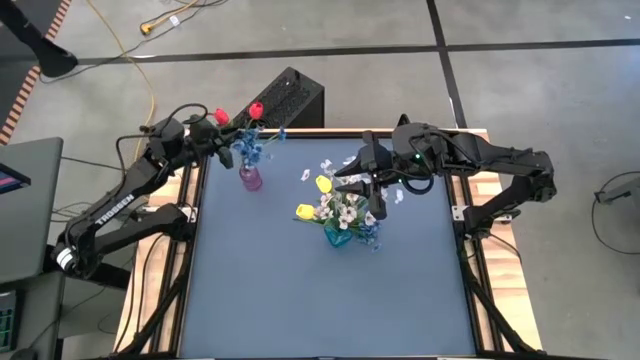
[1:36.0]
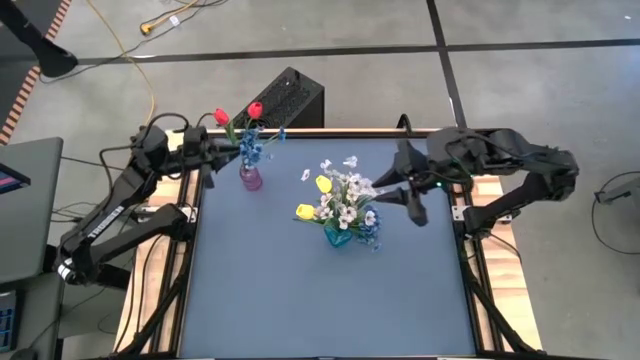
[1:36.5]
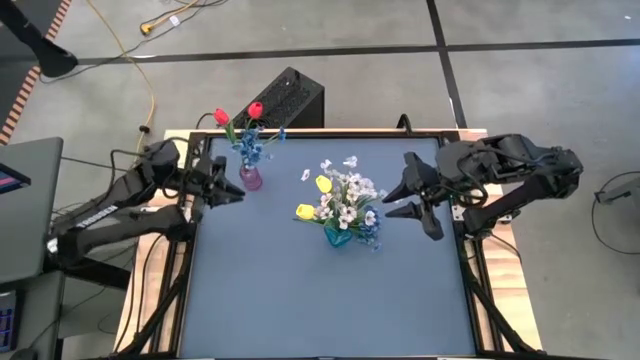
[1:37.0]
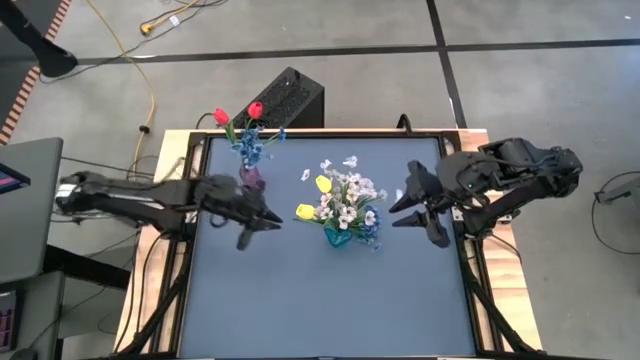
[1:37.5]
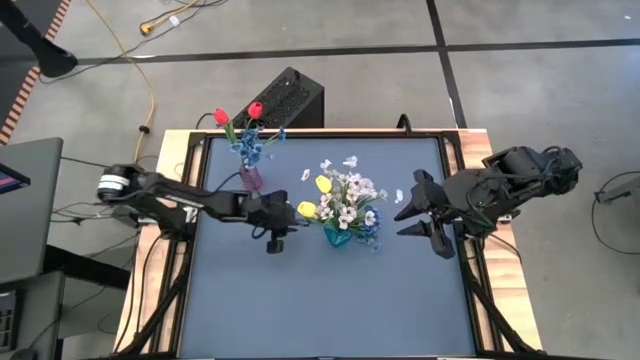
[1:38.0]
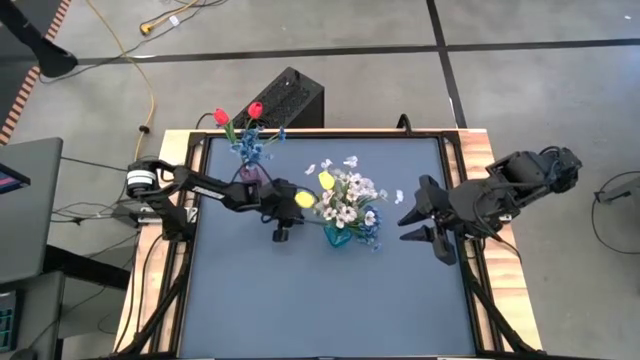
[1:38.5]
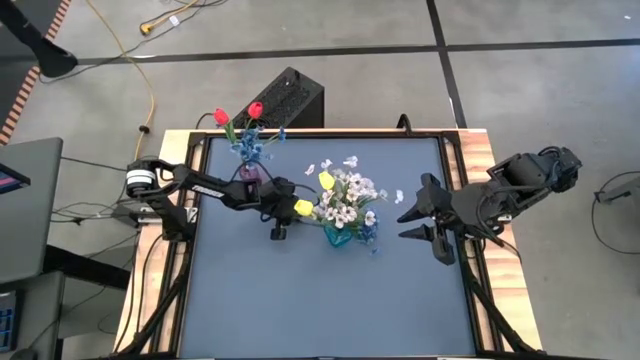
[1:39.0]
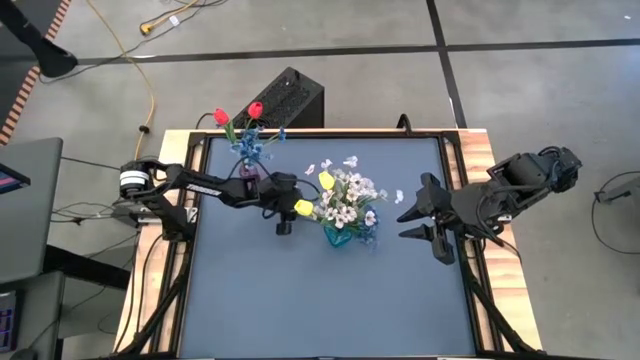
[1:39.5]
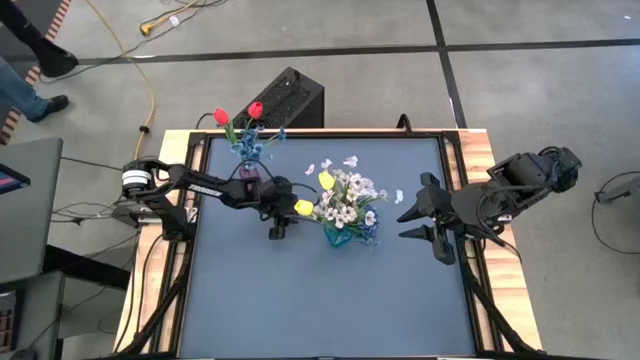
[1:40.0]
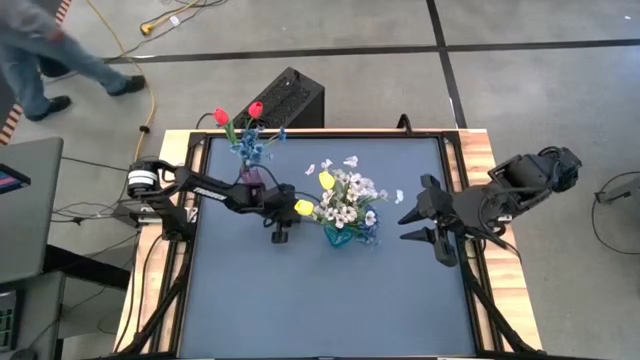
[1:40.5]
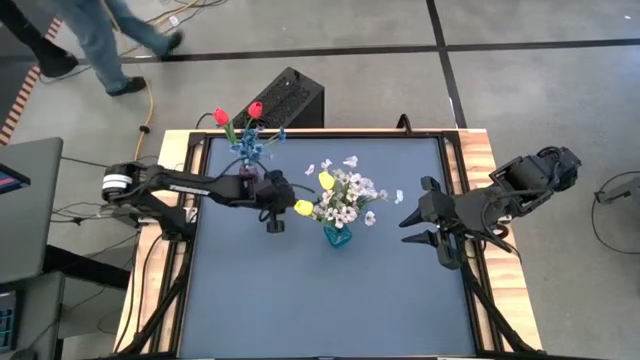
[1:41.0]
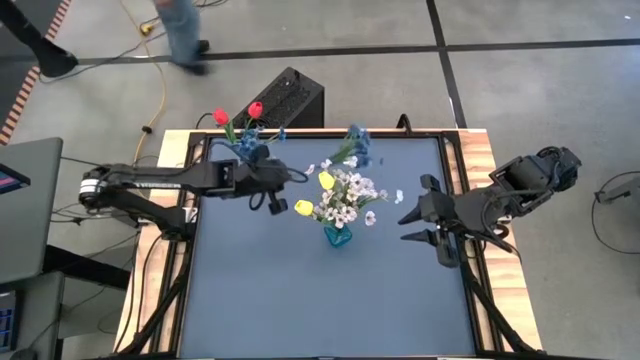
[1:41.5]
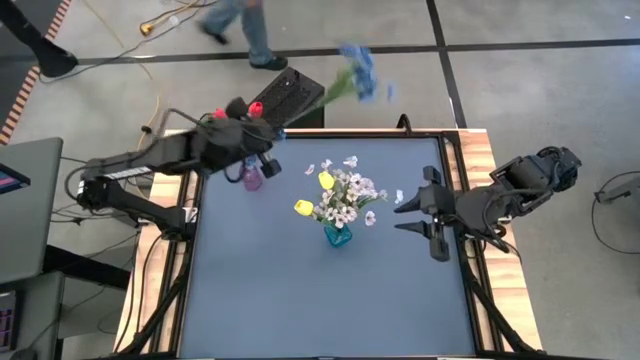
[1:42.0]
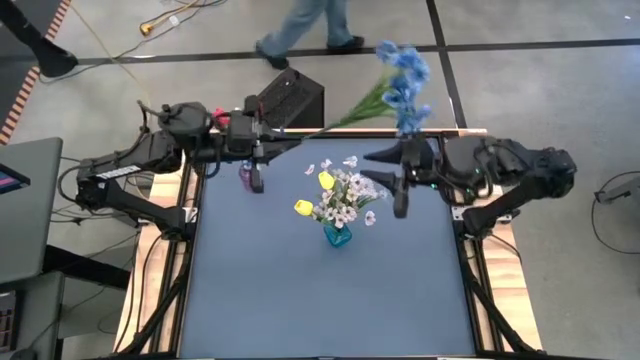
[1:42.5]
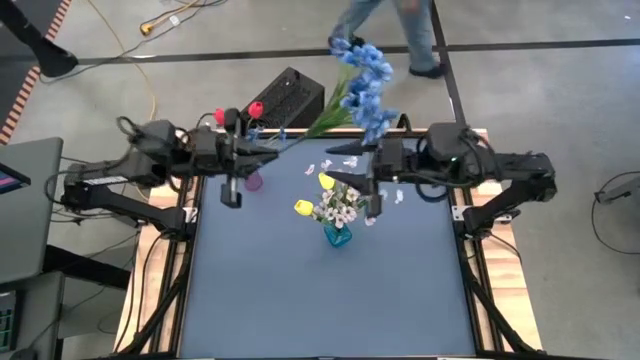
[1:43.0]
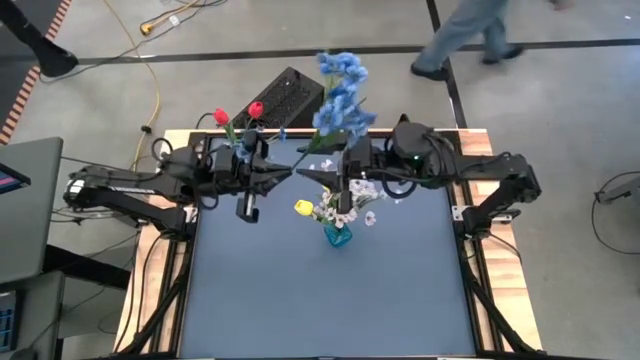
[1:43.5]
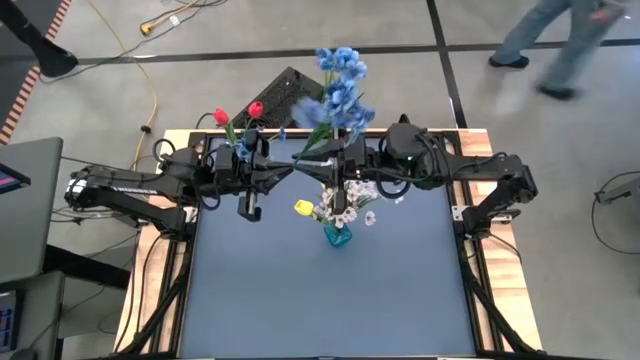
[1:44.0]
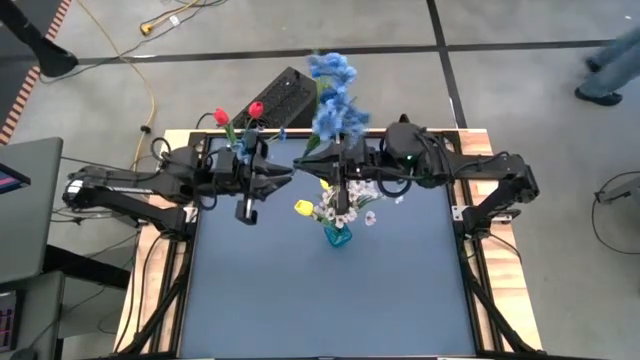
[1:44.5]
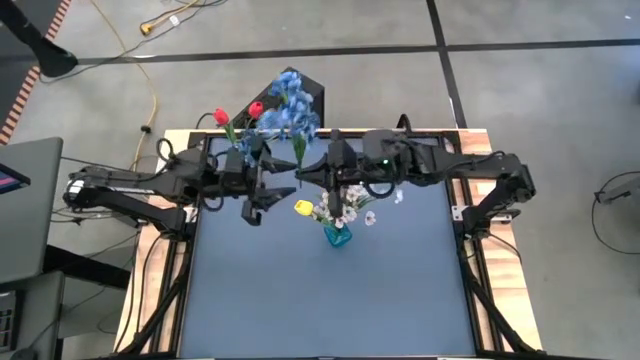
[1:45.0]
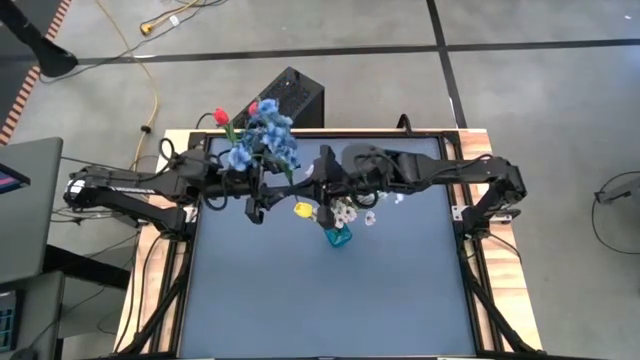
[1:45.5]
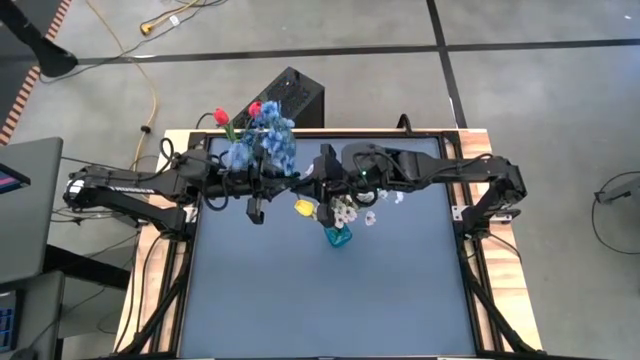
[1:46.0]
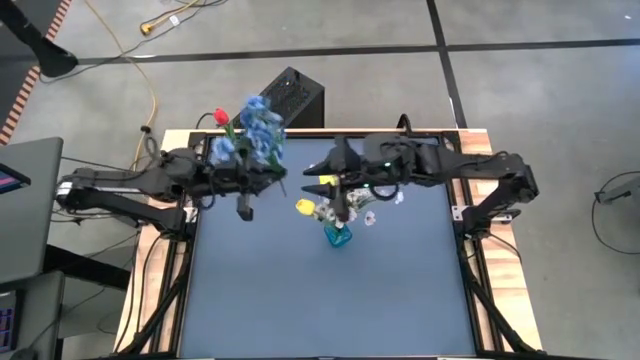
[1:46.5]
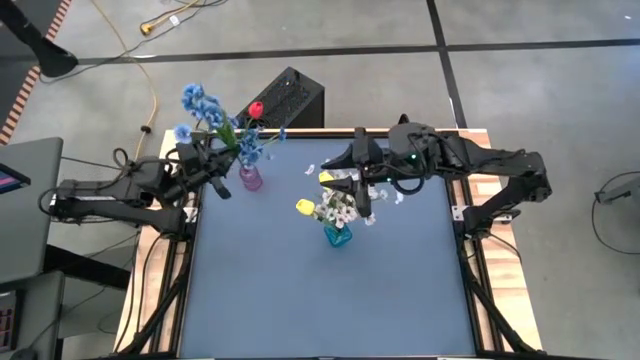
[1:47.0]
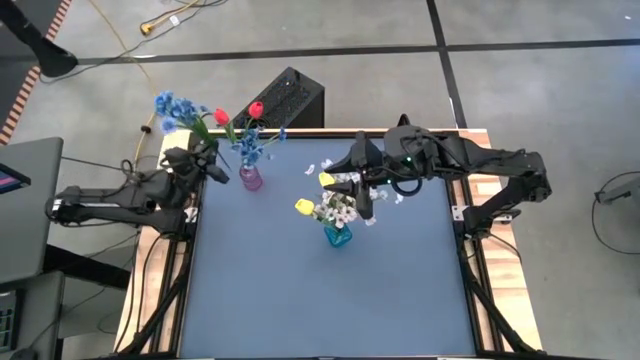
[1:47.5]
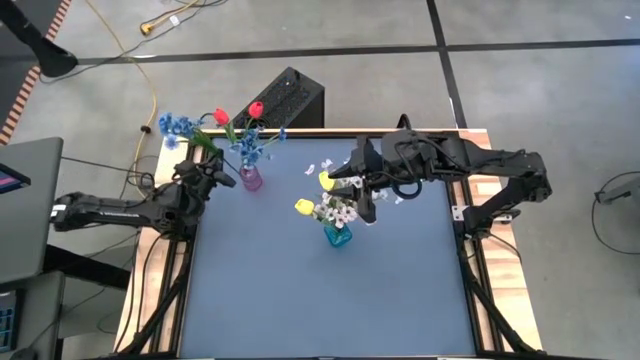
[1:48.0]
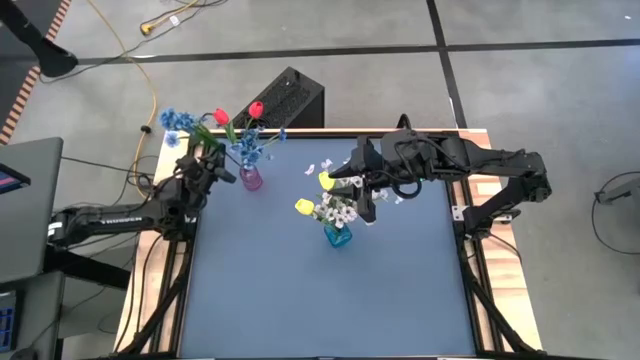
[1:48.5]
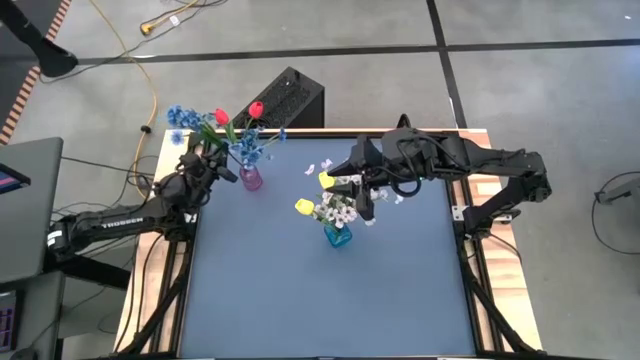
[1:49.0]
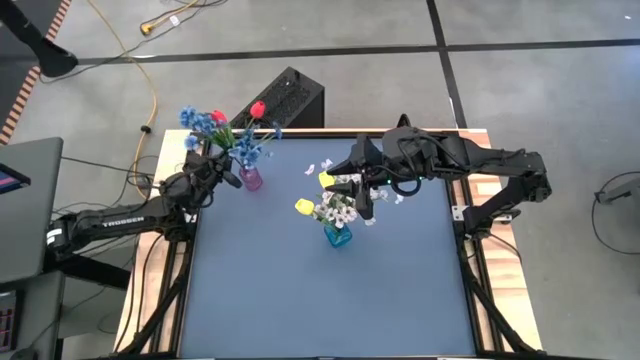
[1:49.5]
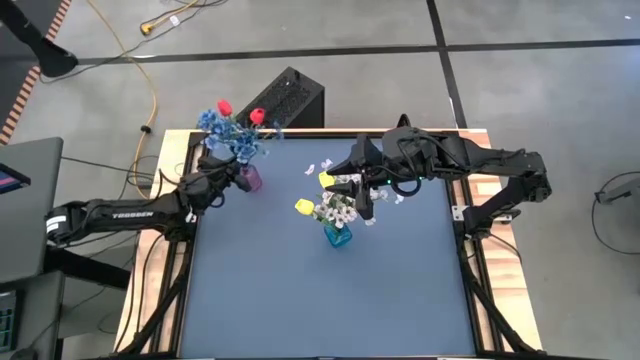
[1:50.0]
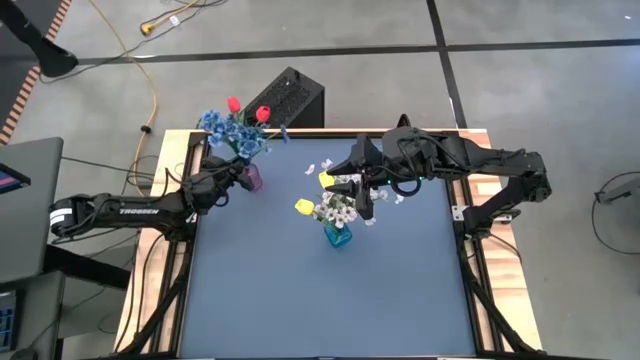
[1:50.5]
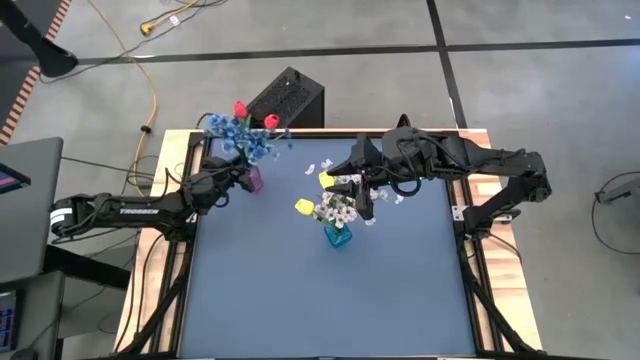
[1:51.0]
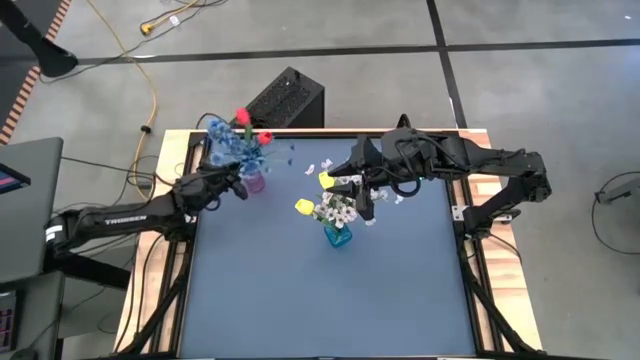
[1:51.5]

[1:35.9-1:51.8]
Task: Sort flowers into vase by color
Put the blue flower into the violet vase

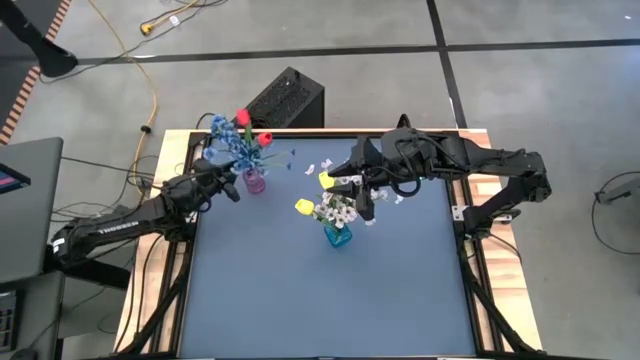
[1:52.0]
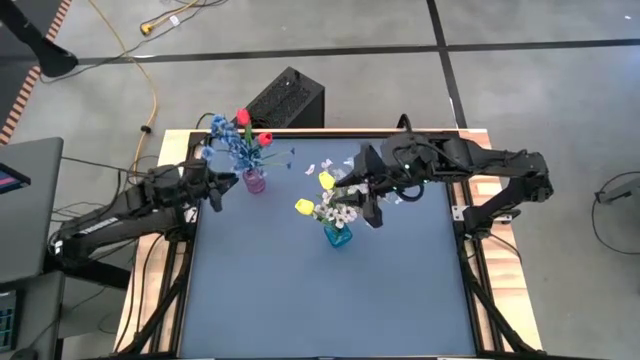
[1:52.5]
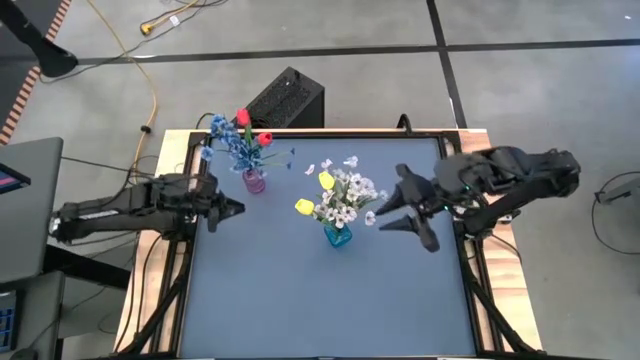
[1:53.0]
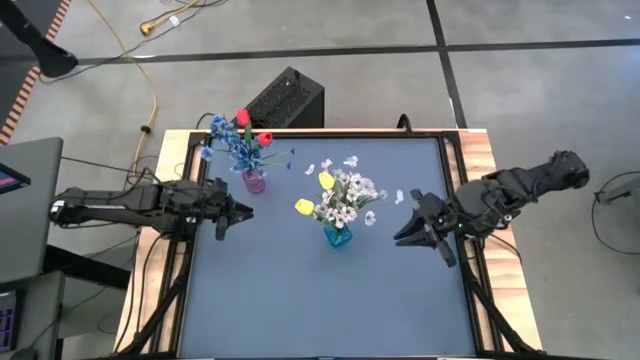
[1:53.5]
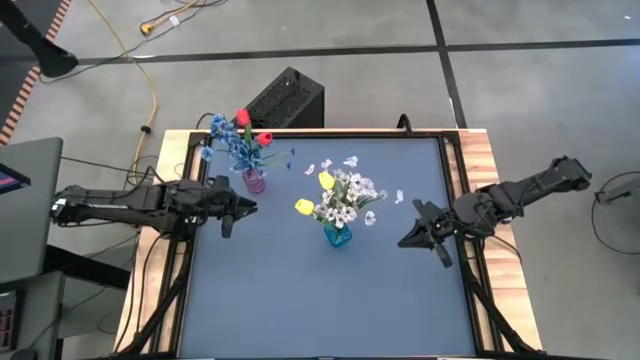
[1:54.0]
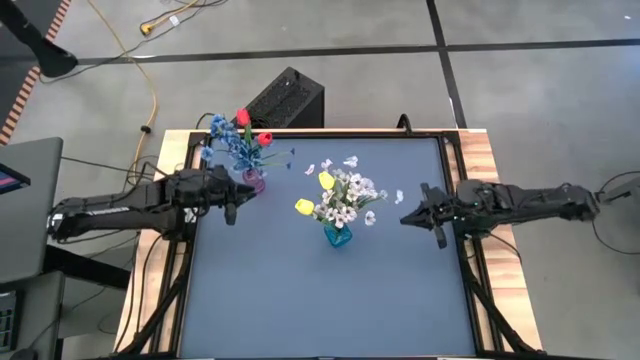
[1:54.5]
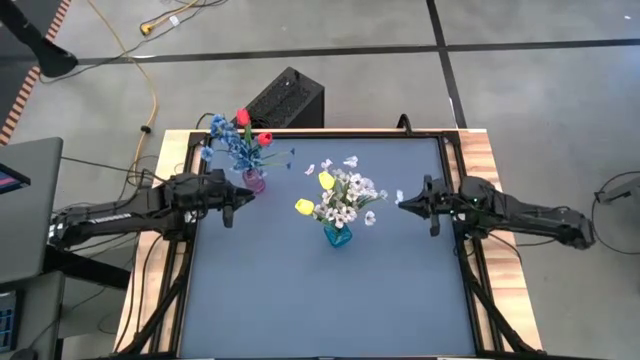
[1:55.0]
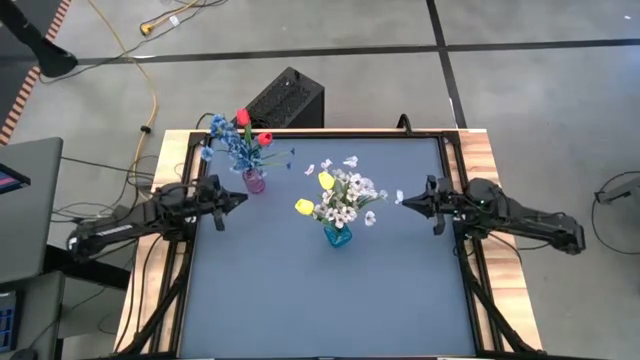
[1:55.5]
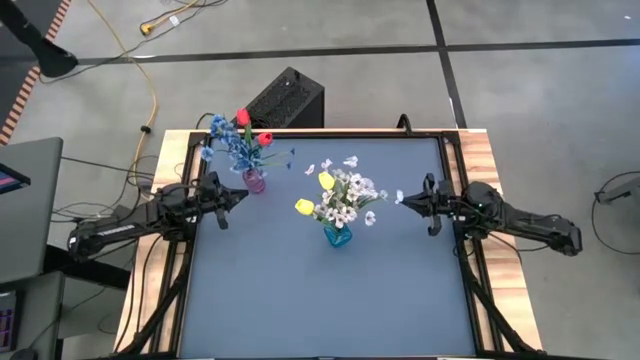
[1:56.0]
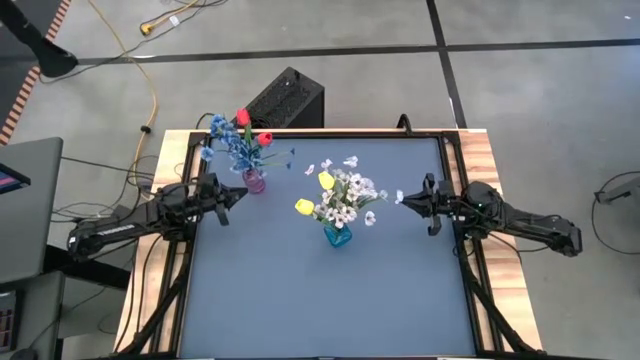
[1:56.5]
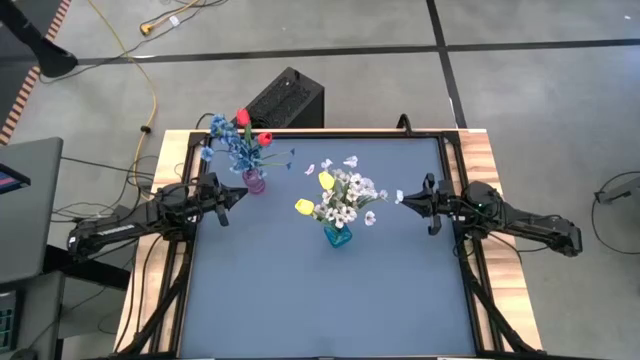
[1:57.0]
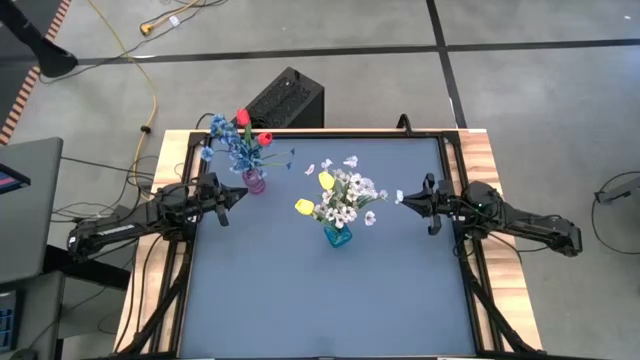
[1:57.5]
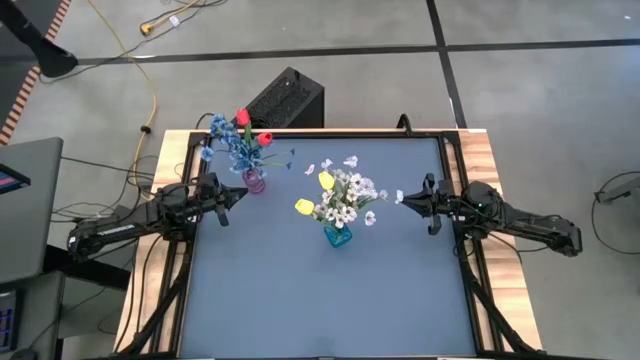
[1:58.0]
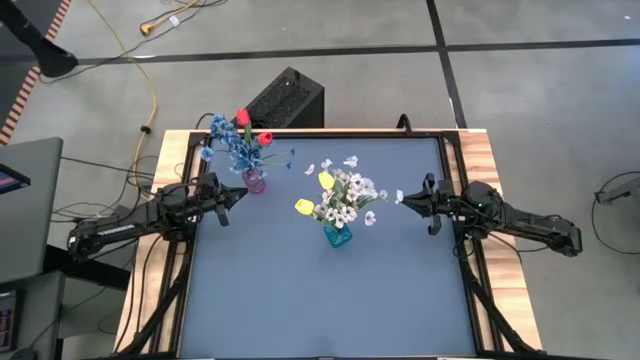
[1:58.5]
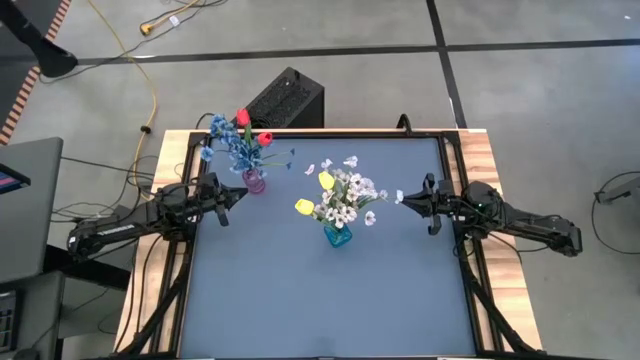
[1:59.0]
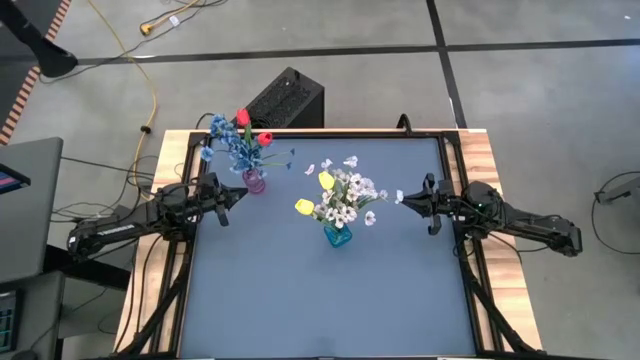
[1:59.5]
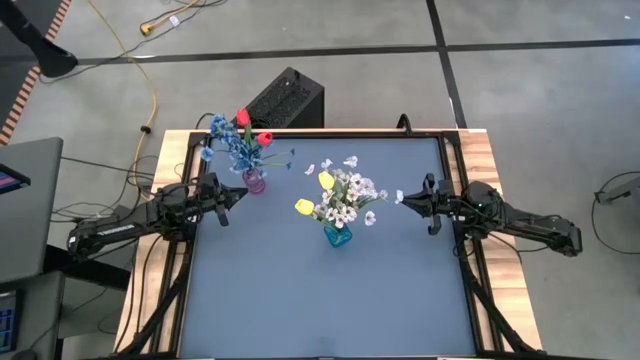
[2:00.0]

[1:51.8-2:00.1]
Return to Home Position
